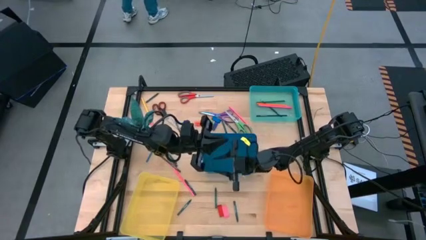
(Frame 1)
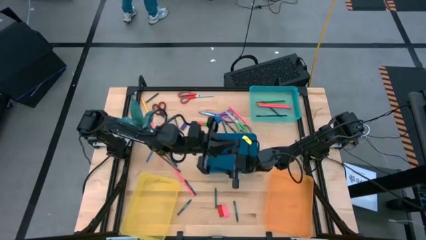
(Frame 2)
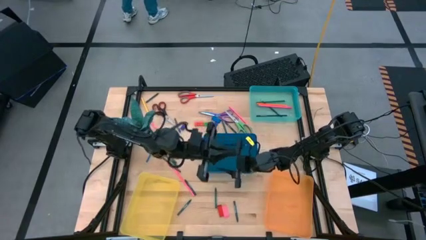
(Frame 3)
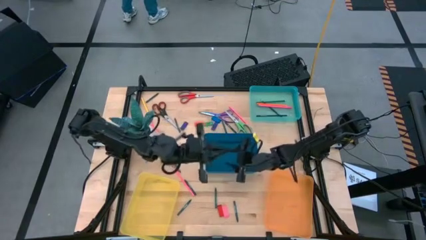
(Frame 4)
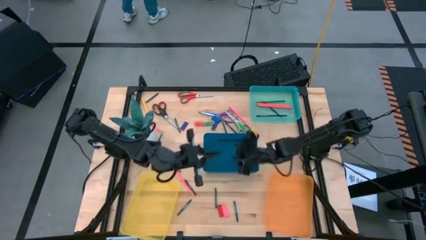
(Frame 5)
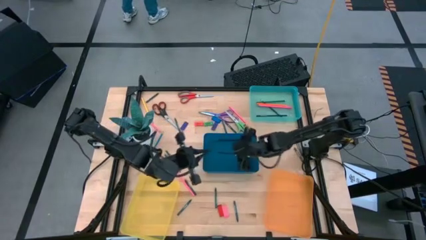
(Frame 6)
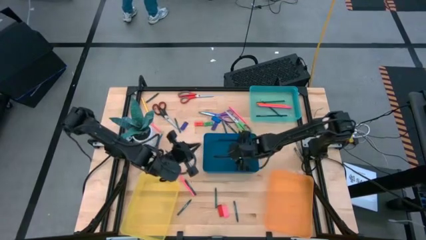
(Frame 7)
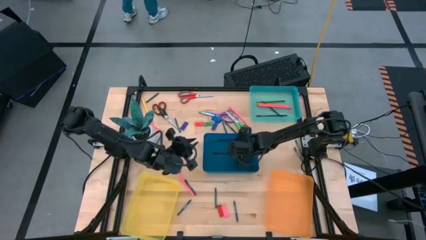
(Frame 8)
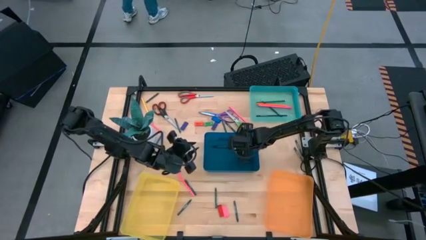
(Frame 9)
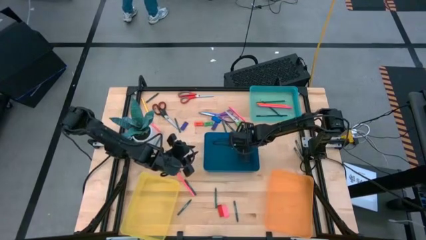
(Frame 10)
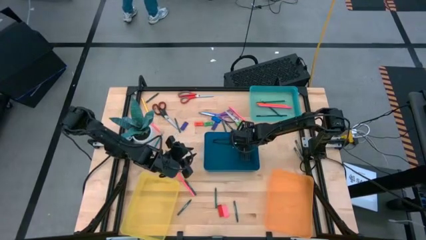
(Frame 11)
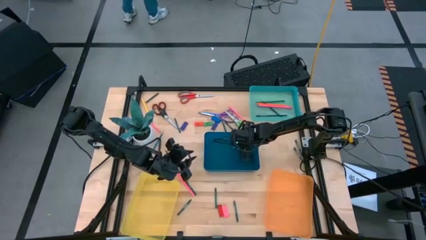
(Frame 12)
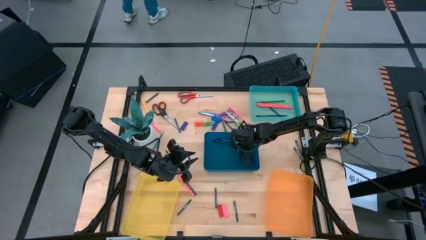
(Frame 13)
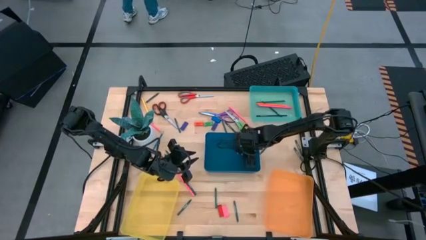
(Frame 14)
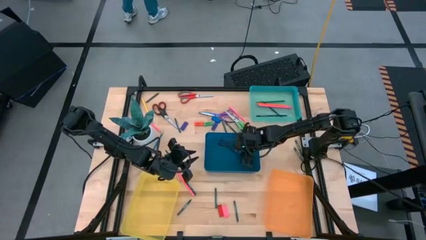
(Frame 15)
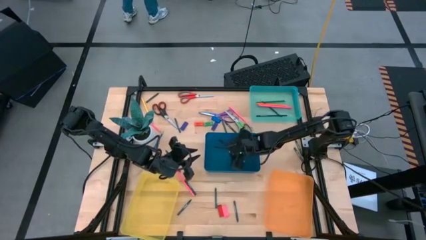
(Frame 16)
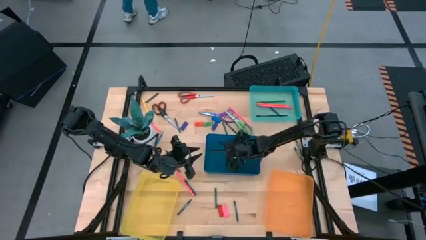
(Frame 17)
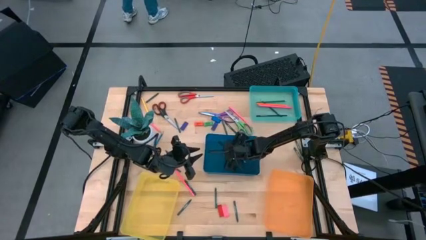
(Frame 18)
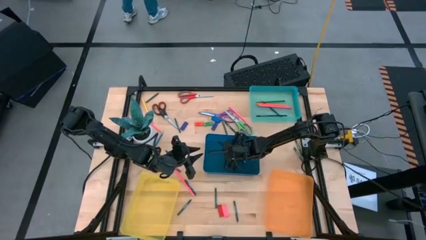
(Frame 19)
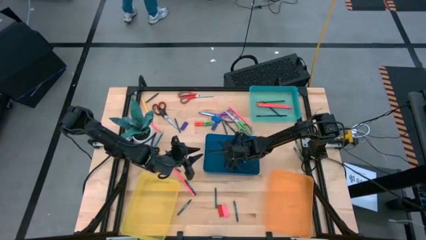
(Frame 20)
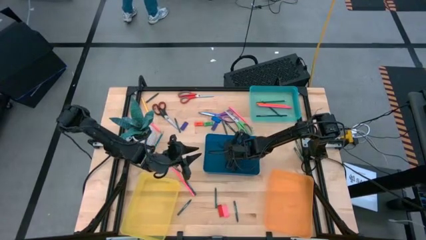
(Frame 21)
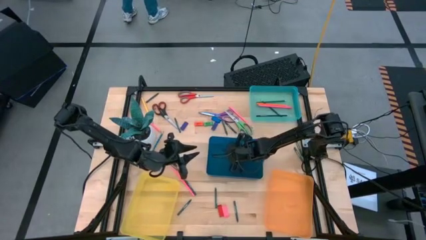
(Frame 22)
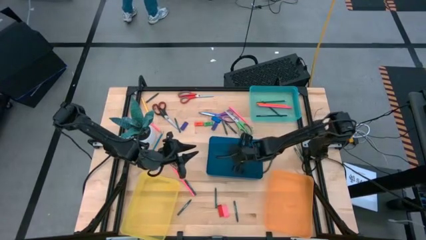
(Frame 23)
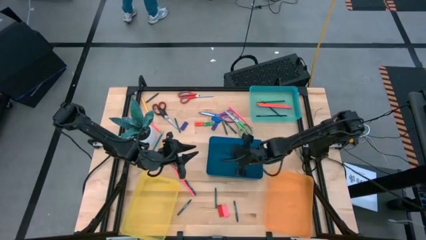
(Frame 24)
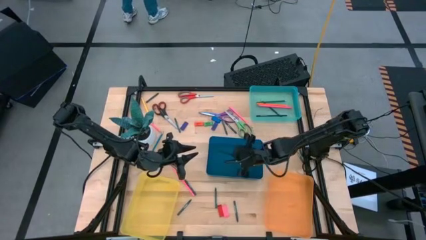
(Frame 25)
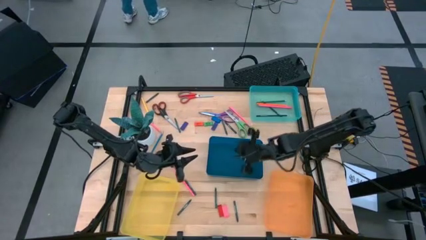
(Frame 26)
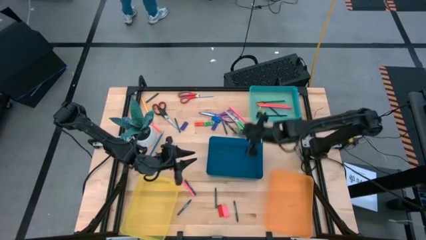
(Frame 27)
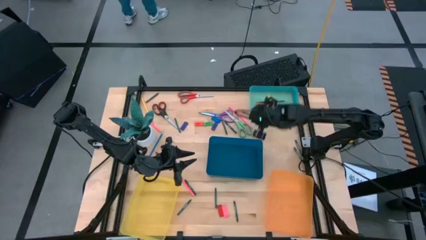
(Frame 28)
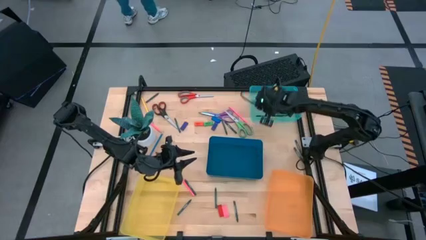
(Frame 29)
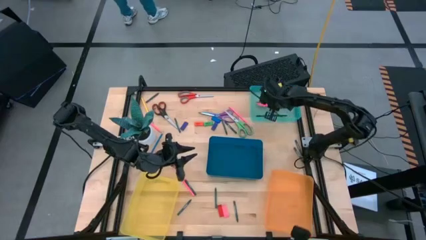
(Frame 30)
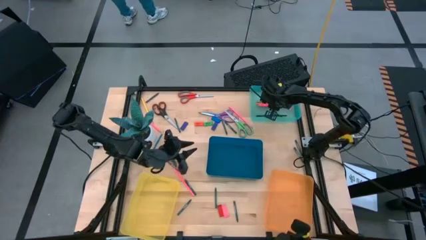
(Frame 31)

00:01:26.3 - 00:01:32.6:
Task: Sort crayons/erasers/pens/pencils in bins
Put the dark blue pencil into the green bin

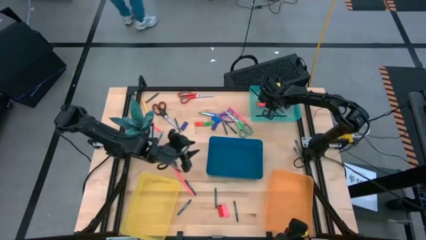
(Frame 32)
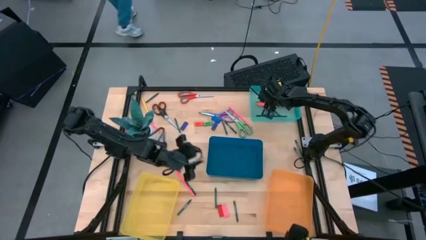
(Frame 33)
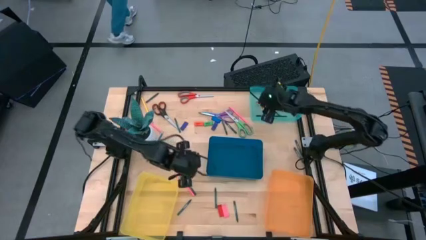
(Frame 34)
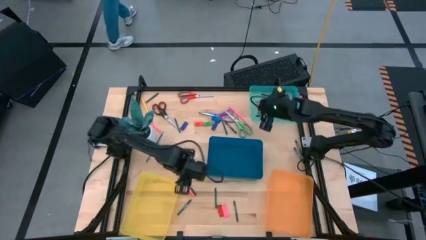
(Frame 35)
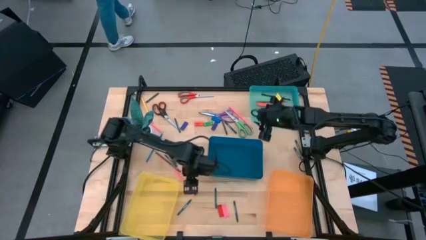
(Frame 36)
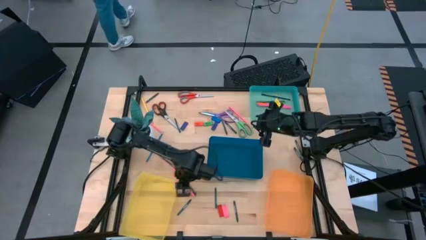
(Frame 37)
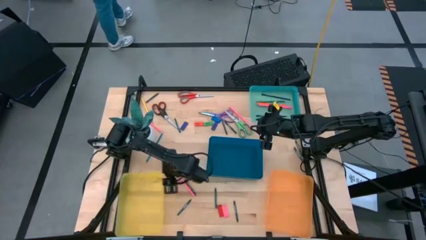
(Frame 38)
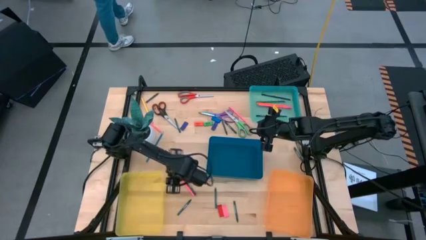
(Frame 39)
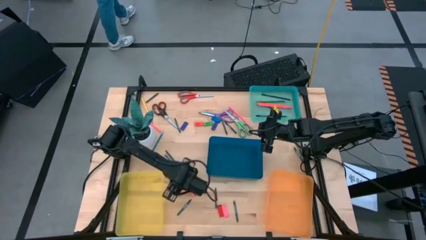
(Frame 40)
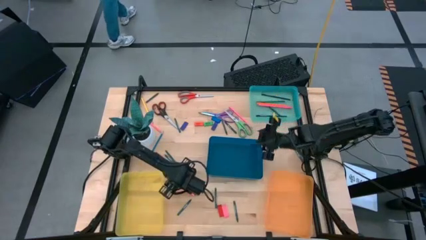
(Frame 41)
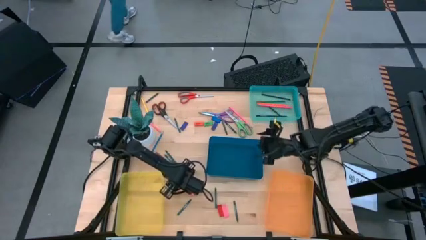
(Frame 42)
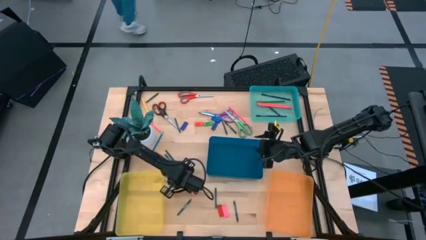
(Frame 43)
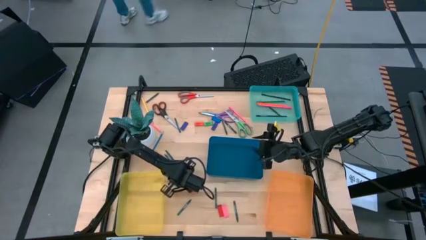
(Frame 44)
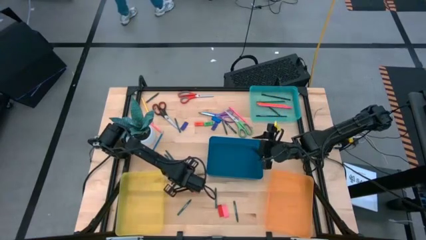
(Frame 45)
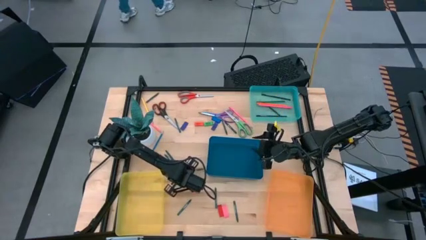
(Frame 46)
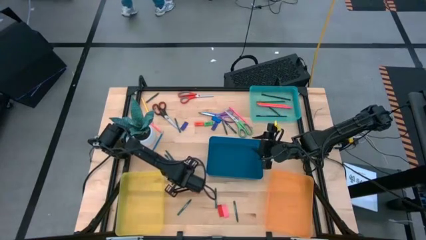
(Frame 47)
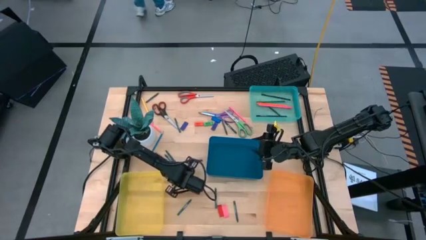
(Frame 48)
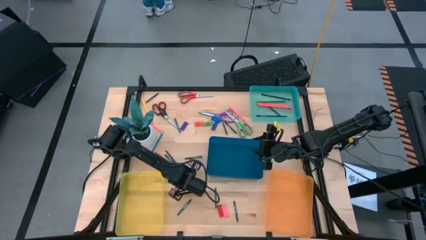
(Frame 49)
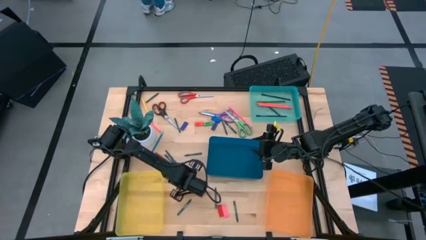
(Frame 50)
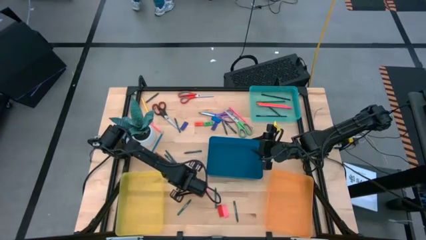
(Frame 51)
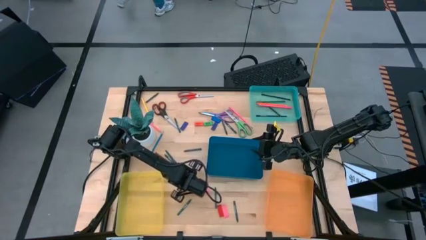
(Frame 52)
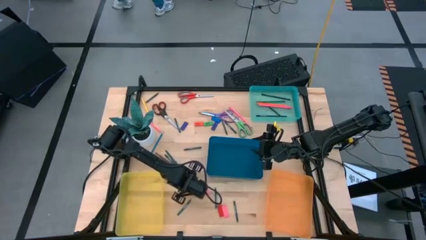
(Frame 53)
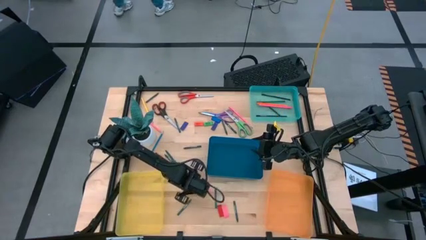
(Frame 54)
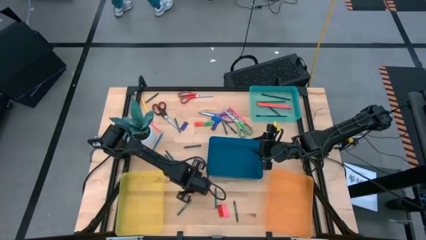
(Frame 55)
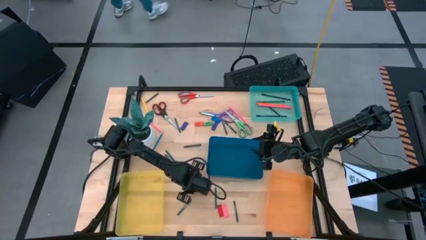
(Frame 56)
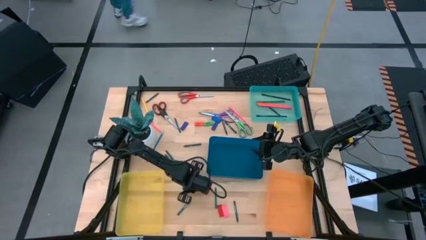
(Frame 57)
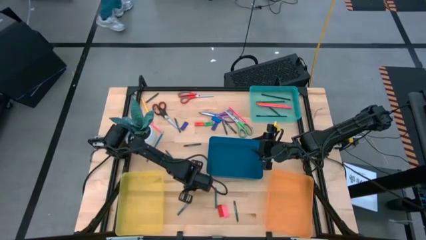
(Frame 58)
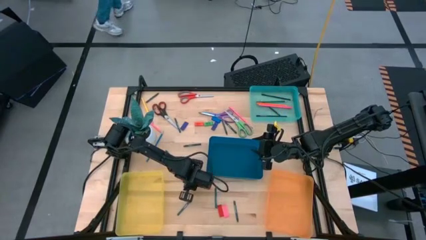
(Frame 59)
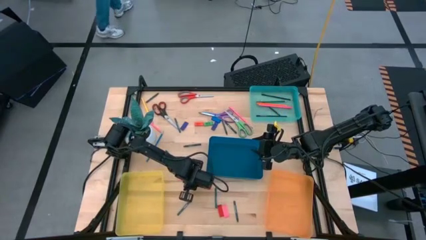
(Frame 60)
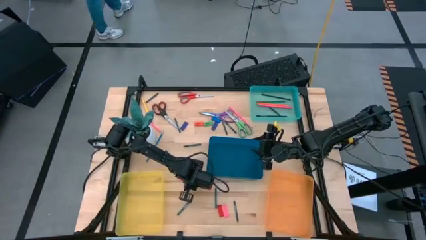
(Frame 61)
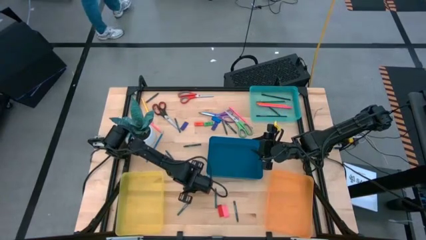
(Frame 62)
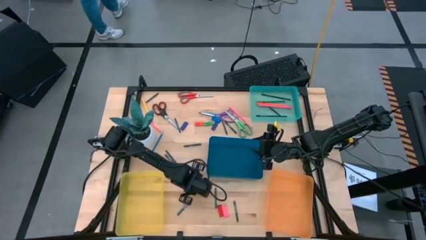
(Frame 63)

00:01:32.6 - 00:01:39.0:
Put the pink pencil into the green bin

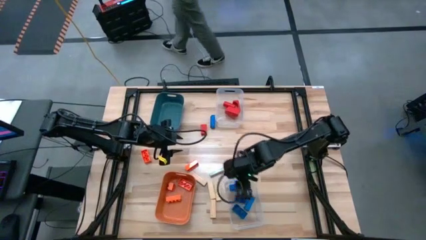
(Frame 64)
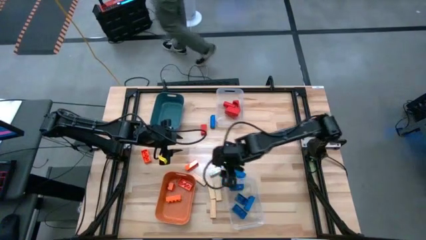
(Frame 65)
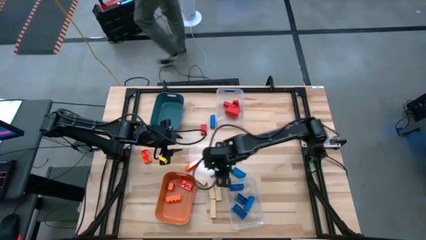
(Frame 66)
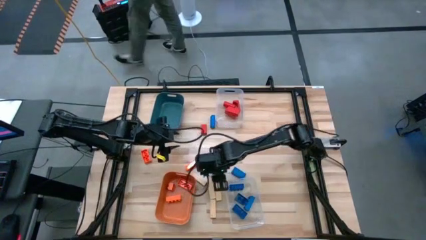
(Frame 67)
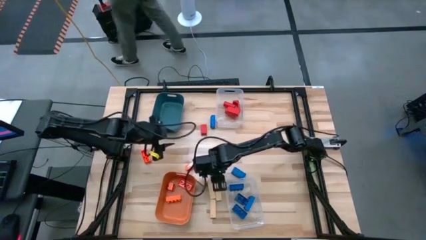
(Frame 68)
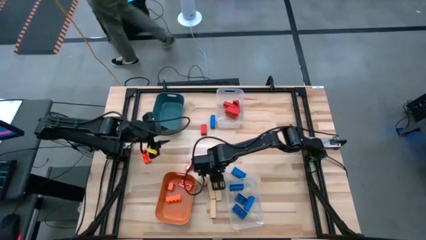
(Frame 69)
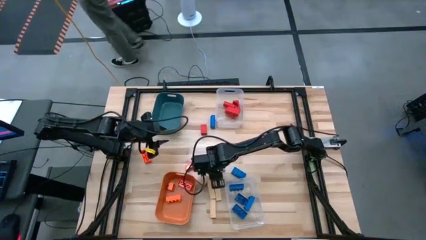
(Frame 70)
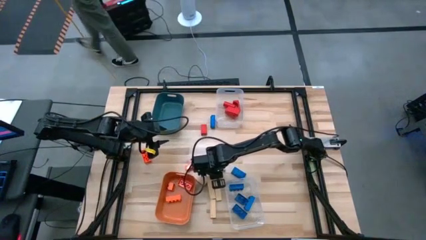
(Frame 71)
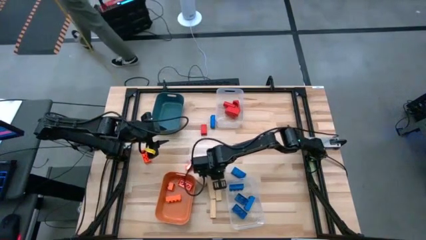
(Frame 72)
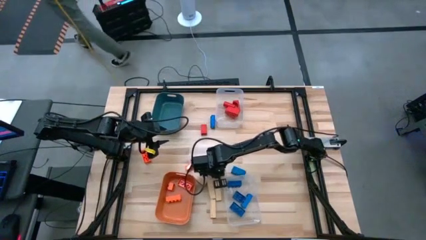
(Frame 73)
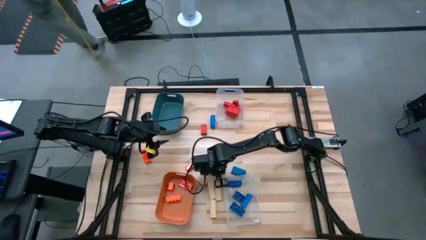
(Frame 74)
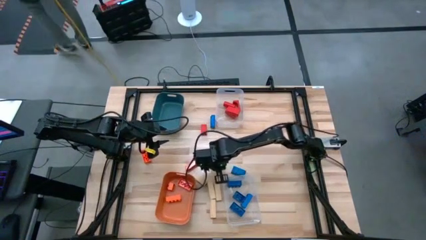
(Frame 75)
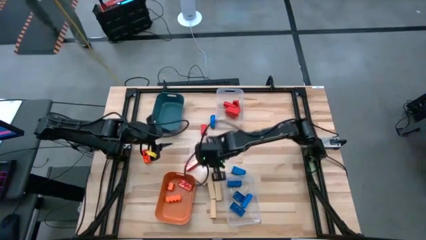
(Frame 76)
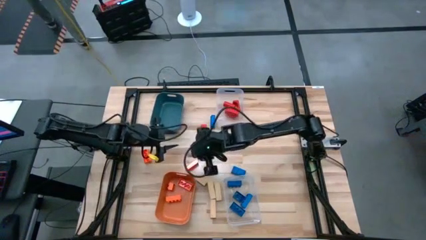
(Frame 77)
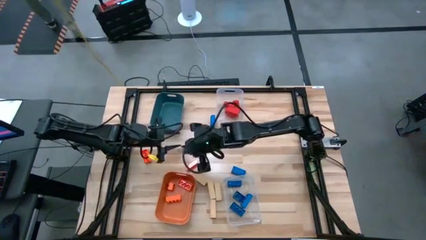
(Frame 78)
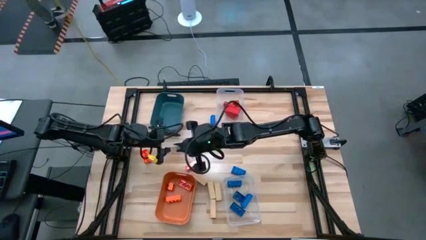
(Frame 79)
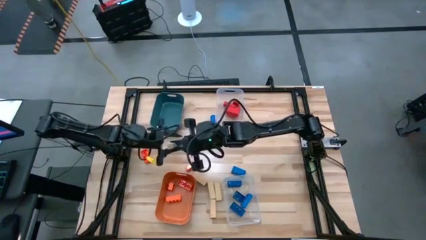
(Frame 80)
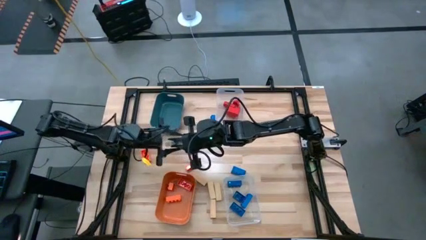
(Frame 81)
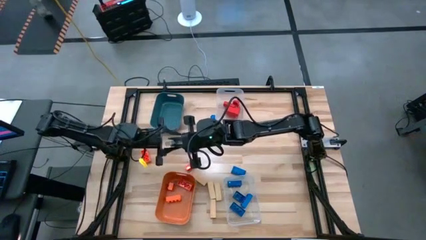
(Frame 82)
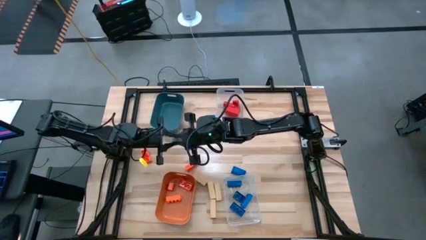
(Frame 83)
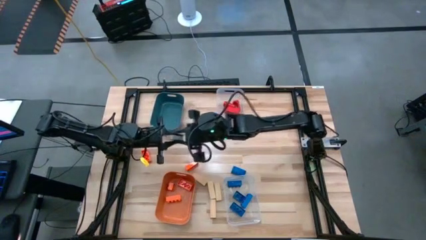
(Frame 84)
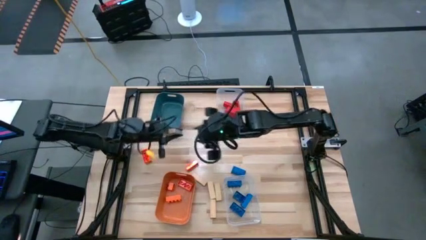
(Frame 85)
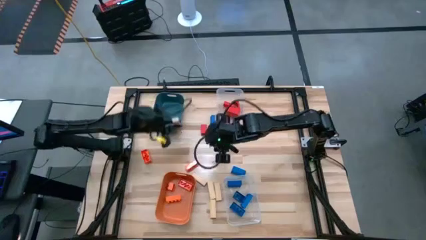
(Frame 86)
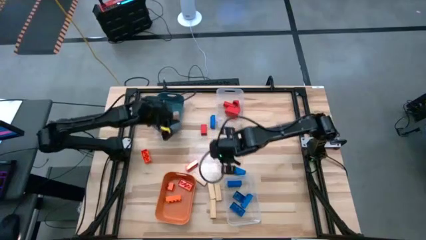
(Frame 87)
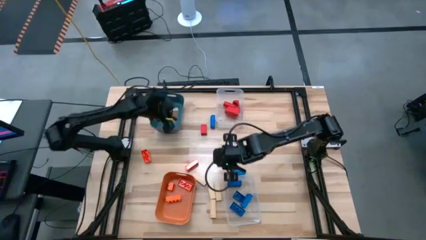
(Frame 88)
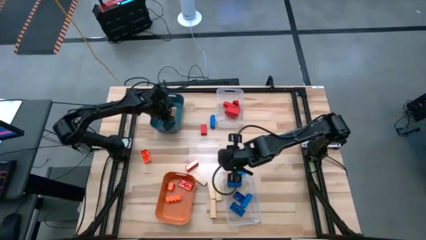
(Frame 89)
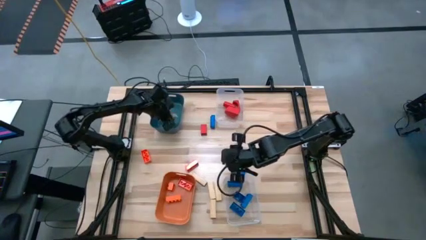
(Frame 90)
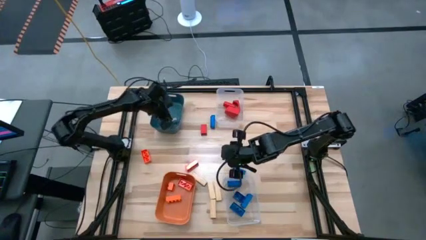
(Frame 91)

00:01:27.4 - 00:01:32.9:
Task: Sort blocks
Put the brown wooden block into the blue bin
